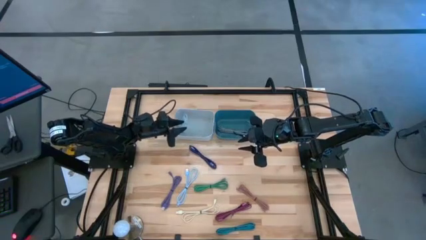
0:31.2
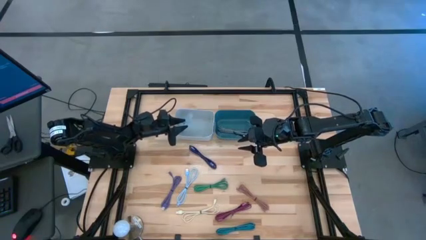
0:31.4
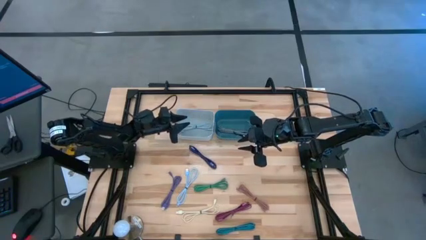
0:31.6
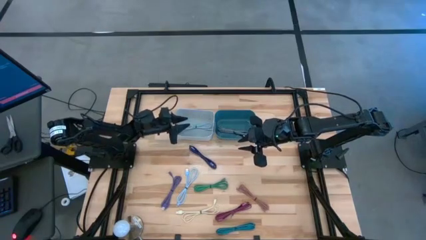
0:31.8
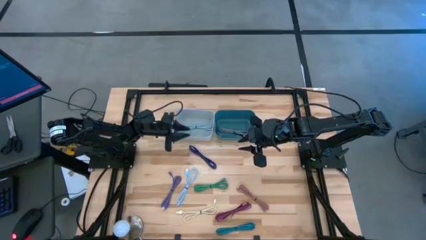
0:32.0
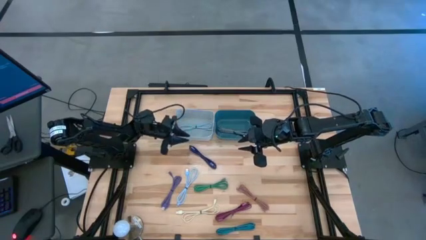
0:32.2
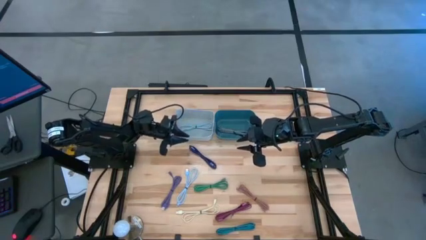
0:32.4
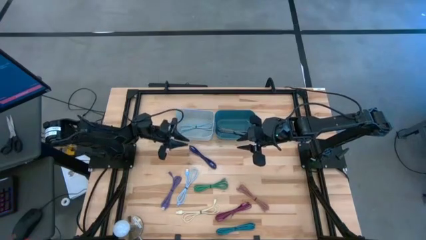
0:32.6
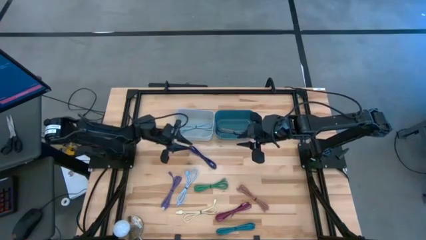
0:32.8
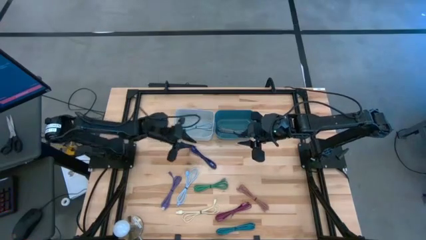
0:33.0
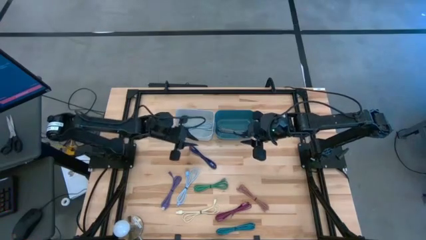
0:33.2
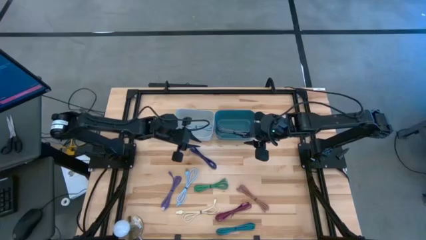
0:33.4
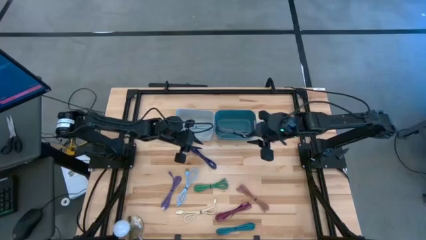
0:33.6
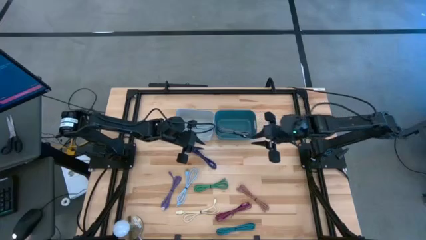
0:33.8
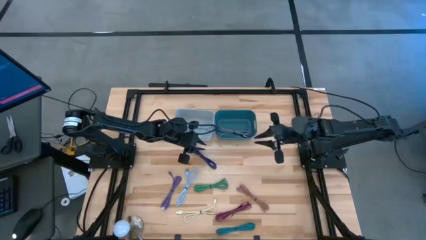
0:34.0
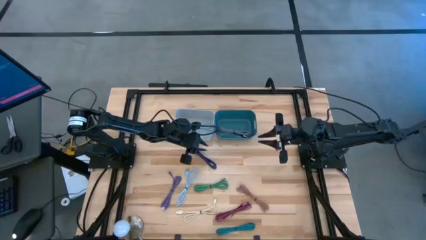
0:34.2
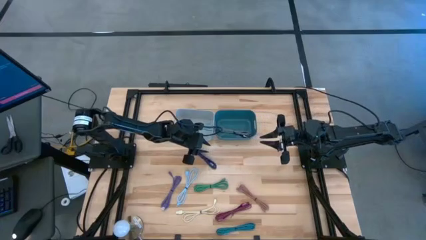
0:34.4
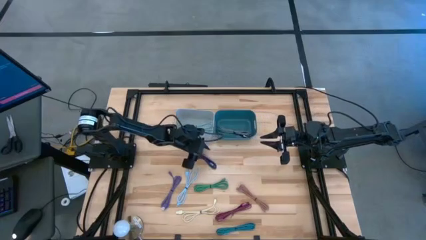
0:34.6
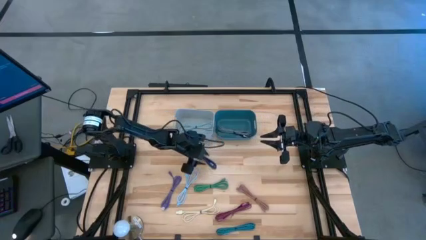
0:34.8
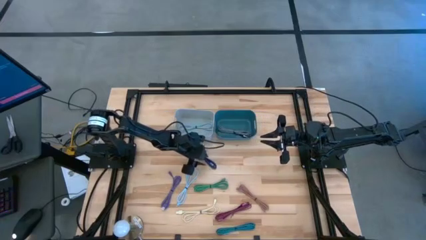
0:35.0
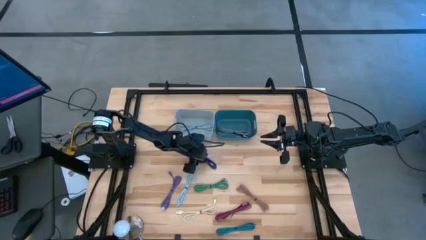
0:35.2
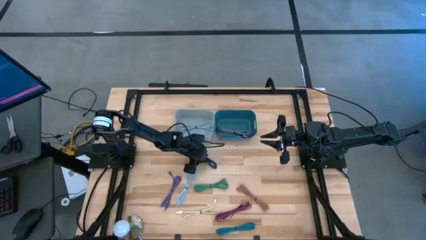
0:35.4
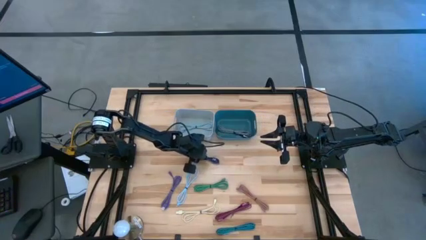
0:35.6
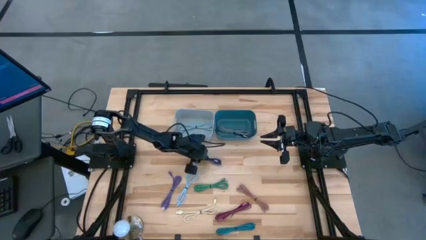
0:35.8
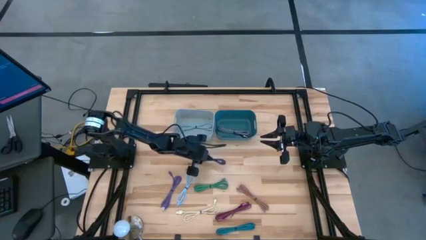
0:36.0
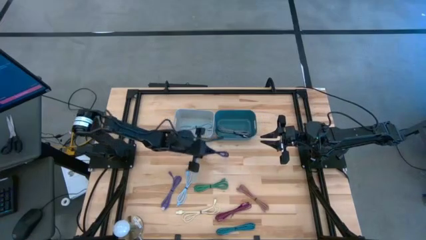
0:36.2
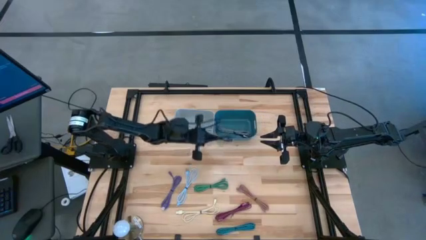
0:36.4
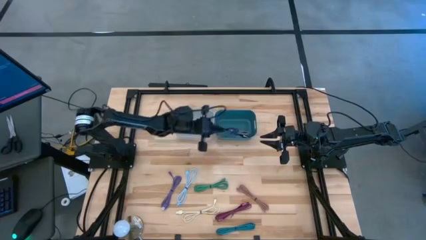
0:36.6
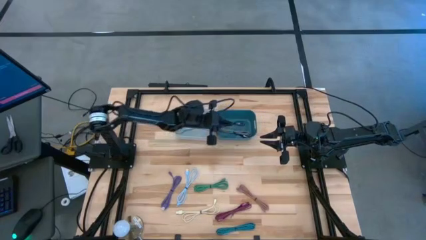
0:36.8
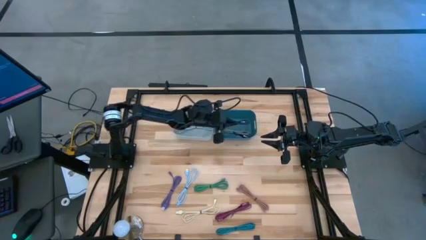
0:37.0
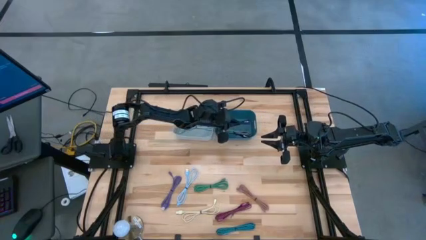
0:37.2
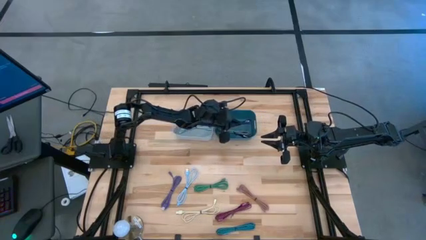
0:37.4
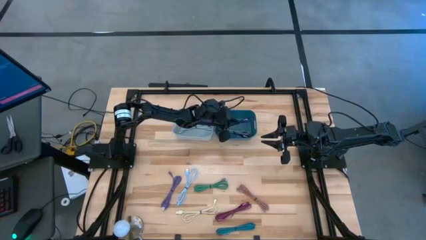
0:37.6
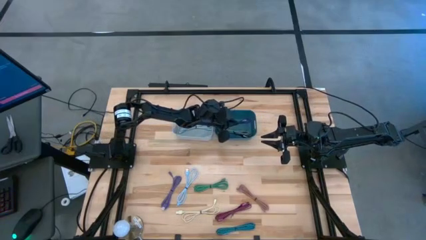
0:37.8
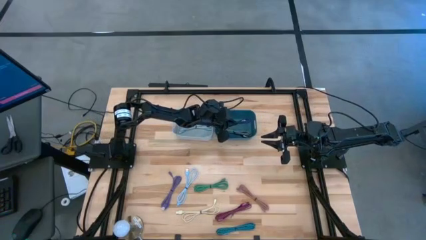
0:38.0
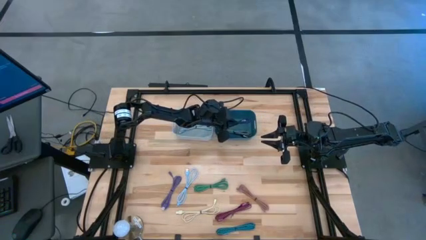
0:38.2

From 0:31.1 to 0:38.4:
Task: Pick & Place USB Port
Put the purple patterned charger cable into the green bin

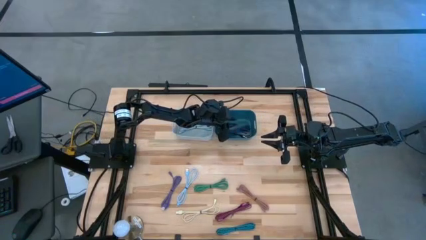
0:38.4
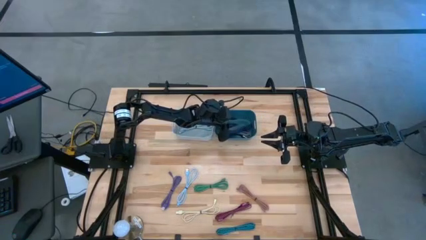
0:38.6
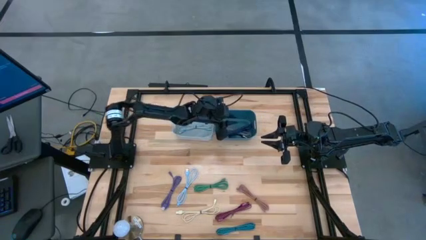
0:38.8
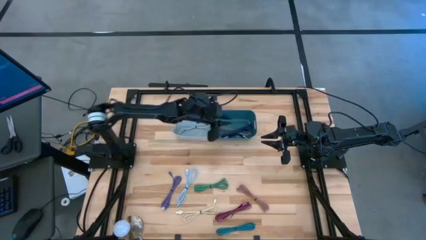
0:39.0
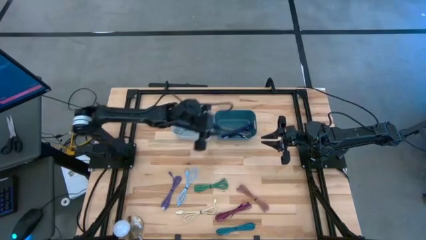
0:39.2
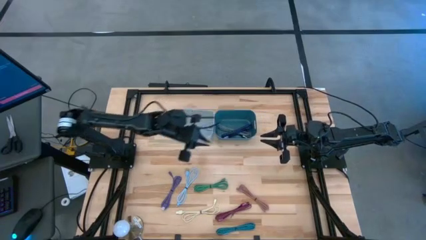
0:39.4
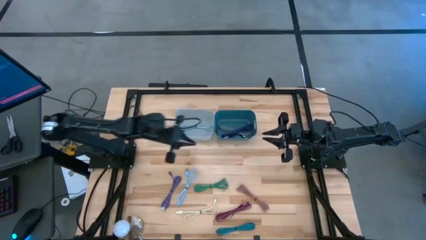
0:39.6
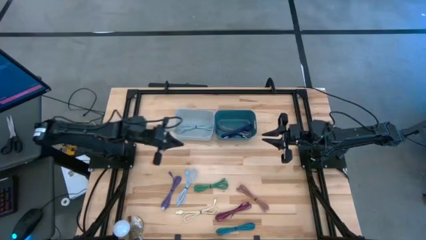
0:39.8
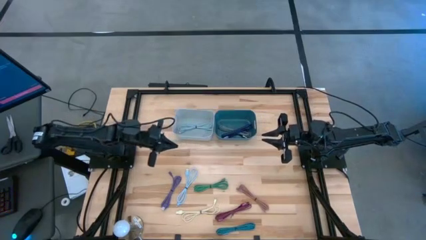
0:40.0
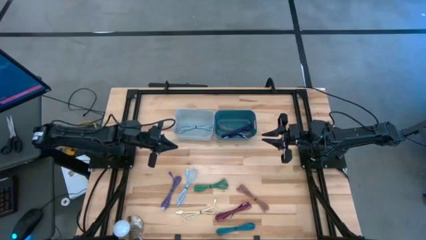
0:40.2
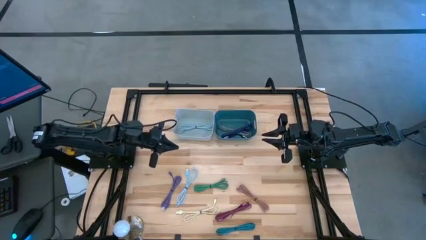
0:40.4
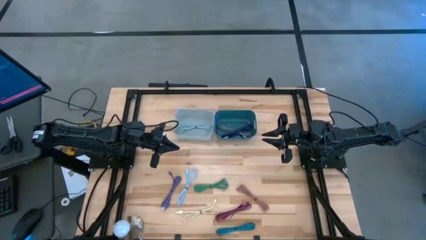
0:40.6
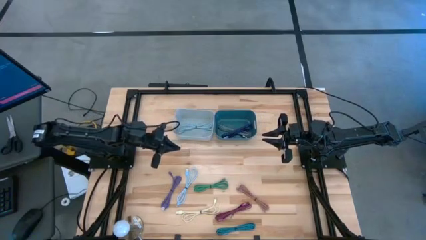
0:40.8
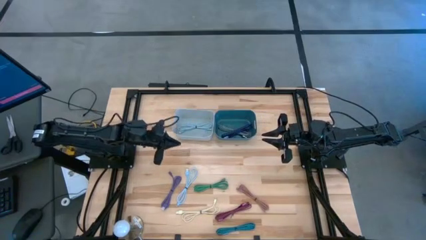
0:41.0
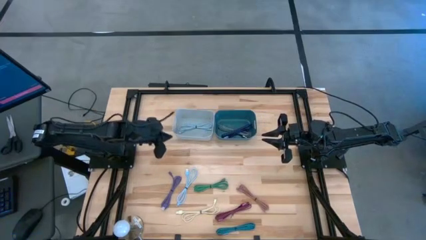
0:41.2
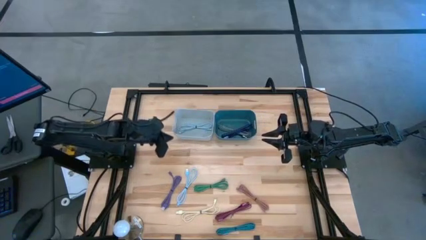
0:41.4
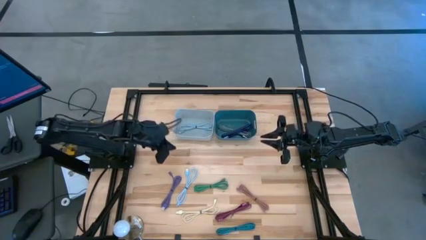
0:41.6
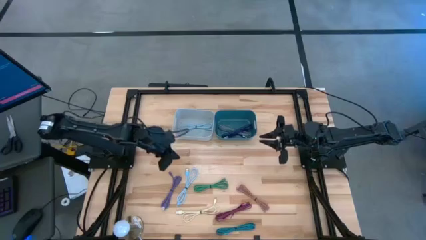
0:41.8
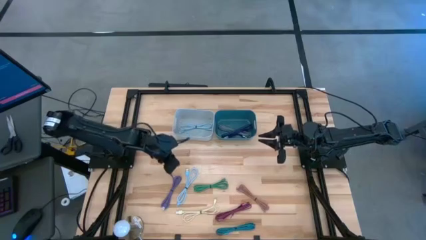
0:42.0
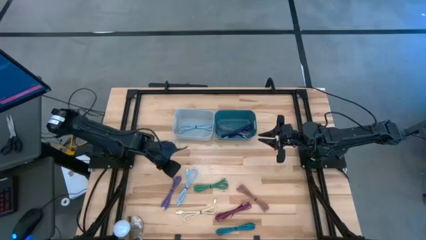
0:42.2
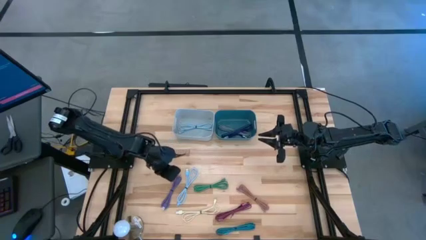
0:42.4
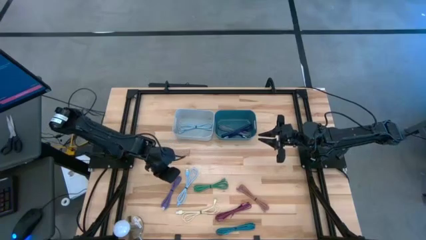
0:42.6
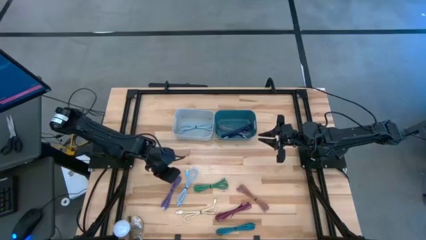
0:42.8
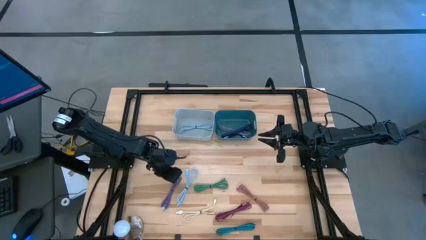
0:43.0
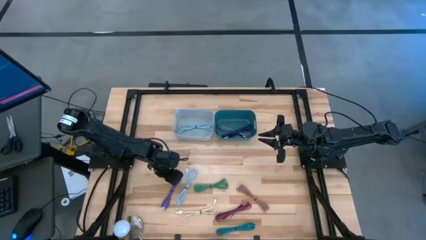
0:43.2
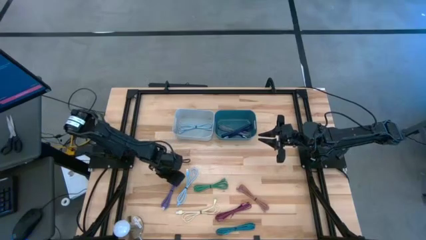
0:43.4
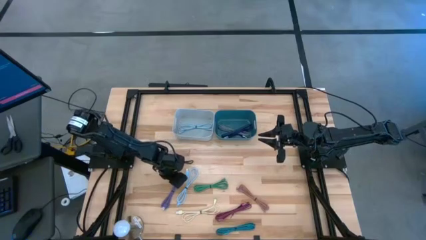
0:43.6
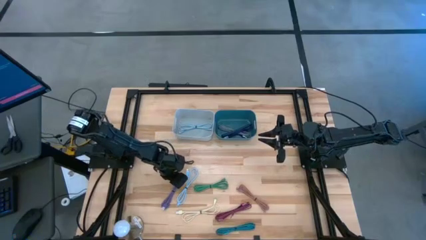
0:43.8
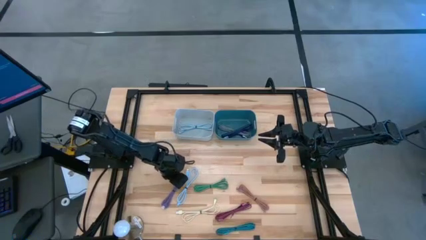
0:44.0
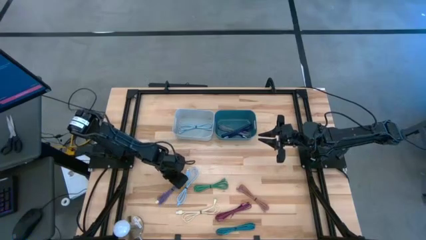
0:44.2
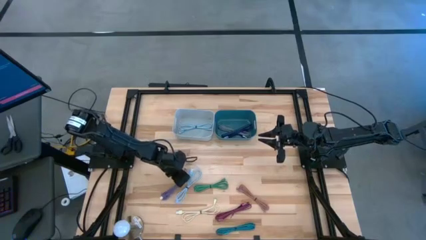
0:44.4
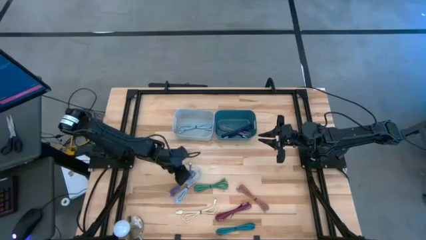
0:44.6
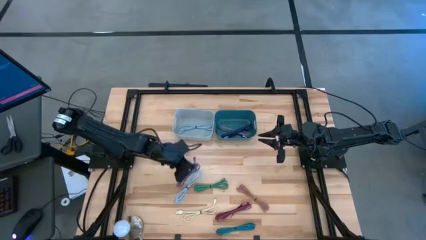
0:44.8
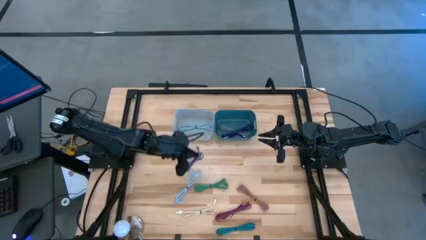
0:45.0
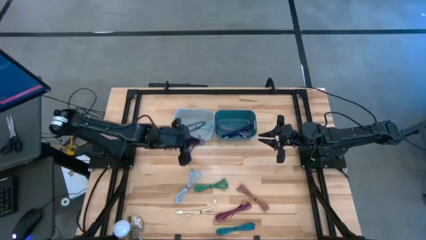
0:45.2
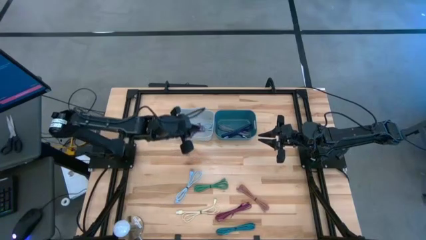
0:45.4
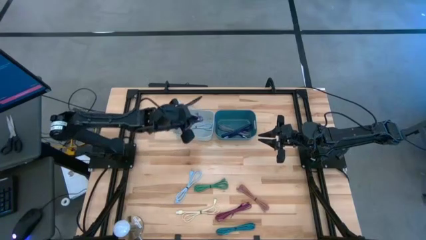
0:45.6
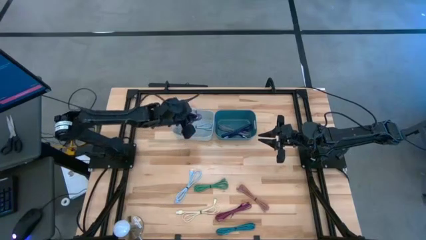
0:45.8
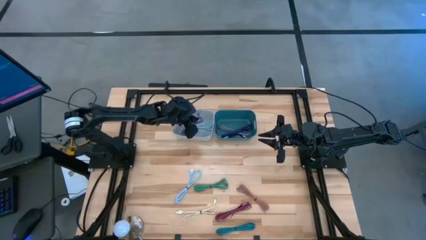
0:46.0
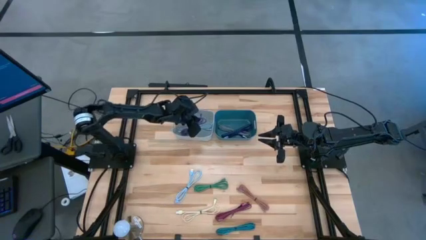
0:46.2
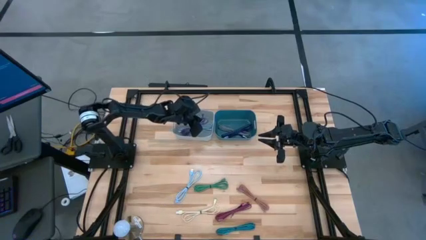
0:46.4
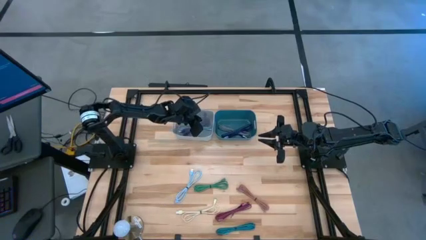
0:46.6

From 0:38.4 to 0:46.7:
Put the purple charger cable into the white bin
